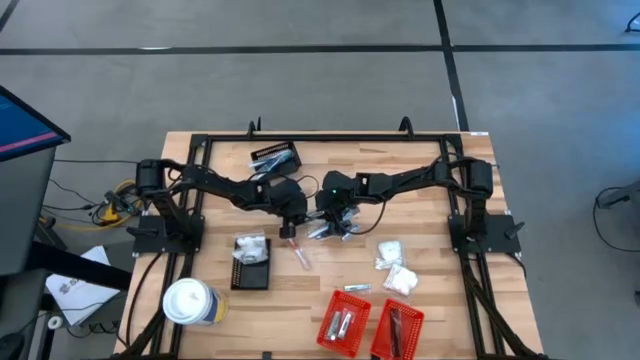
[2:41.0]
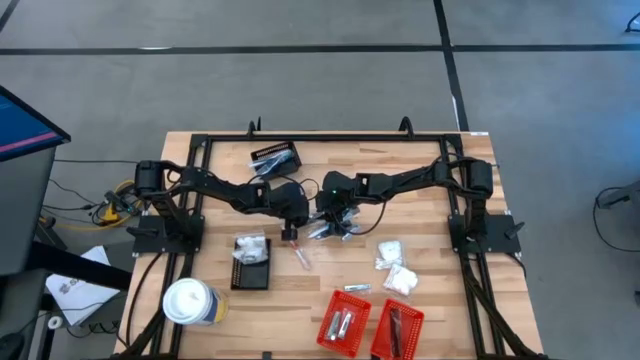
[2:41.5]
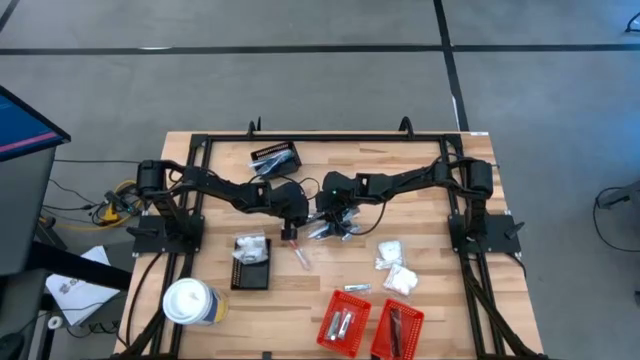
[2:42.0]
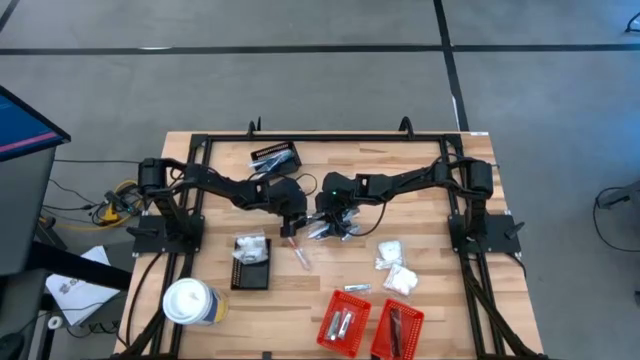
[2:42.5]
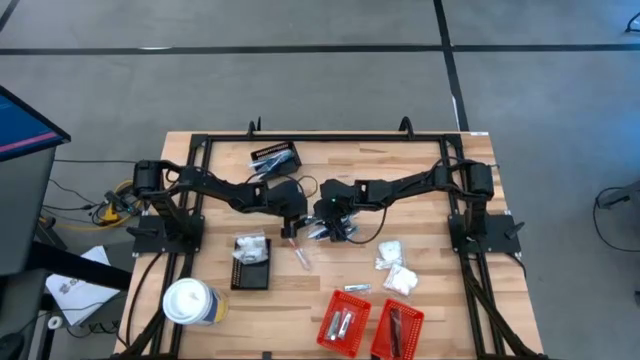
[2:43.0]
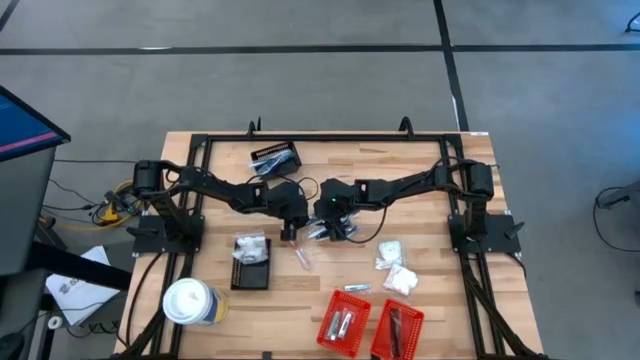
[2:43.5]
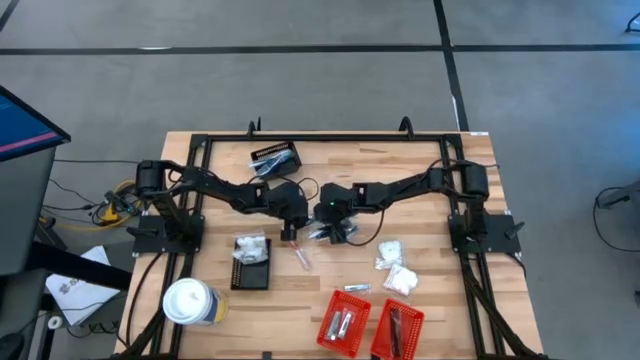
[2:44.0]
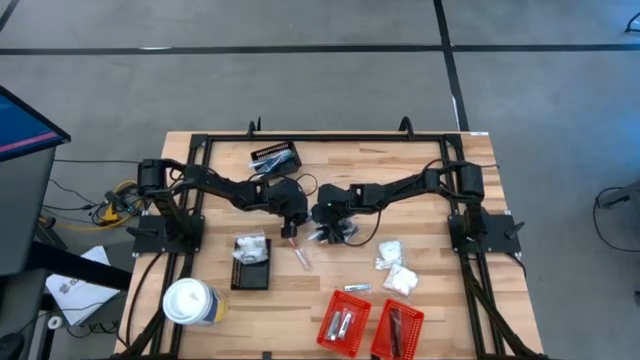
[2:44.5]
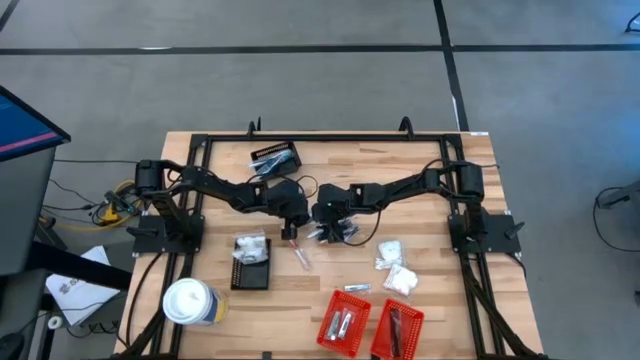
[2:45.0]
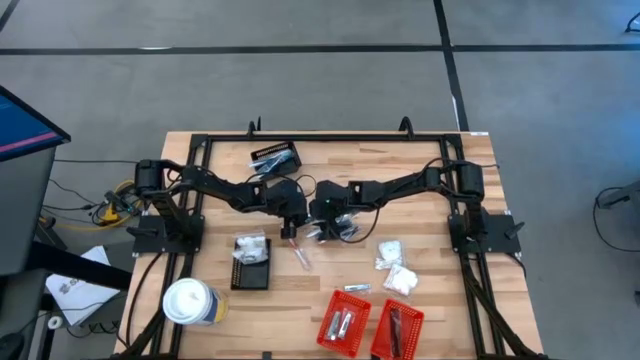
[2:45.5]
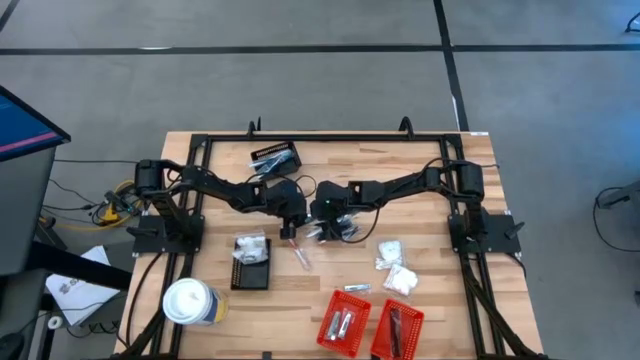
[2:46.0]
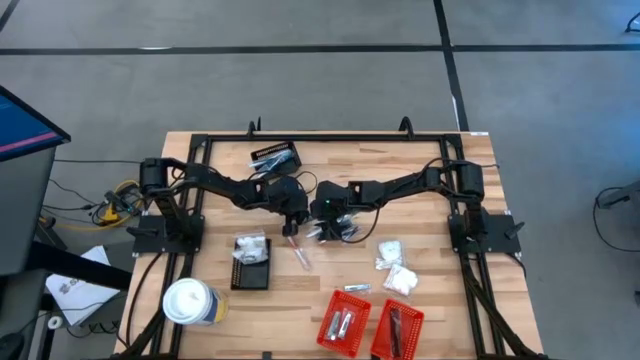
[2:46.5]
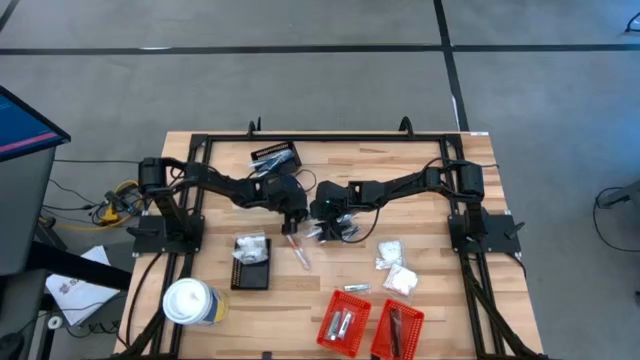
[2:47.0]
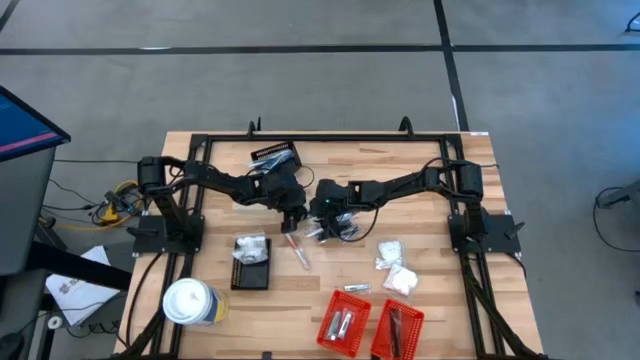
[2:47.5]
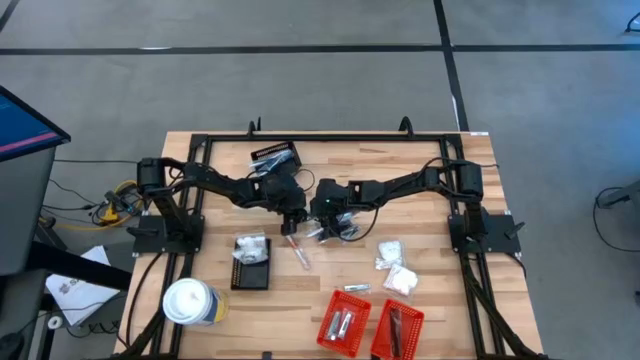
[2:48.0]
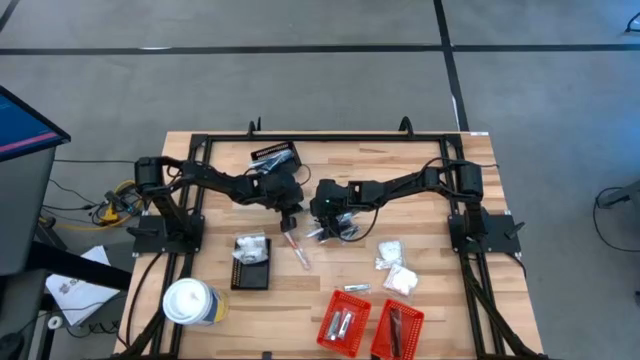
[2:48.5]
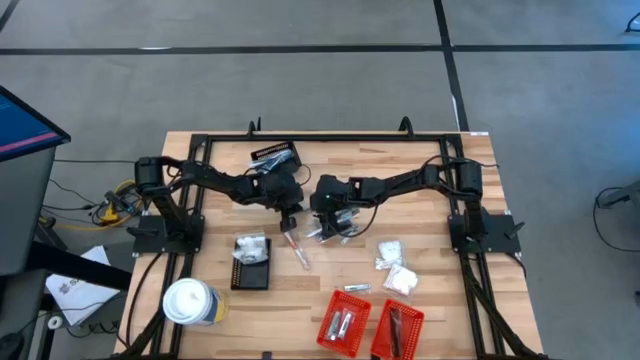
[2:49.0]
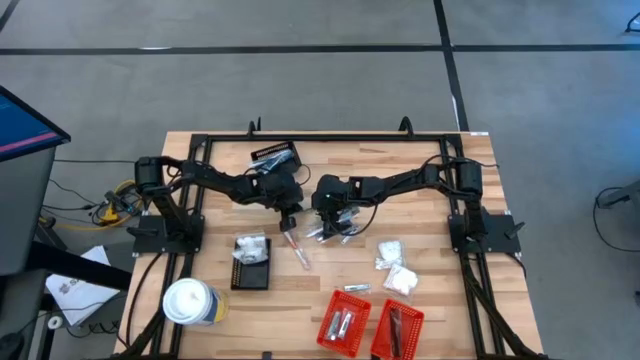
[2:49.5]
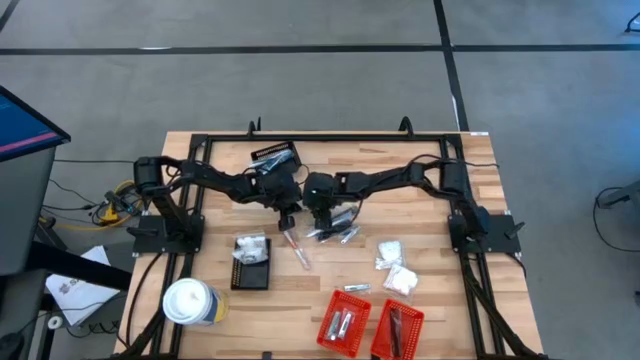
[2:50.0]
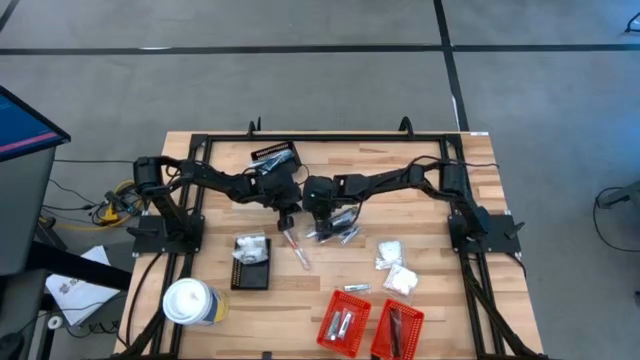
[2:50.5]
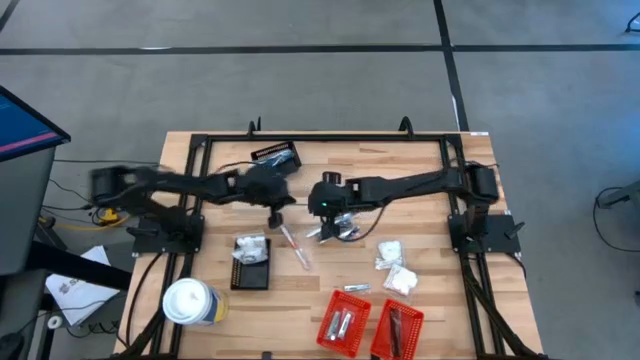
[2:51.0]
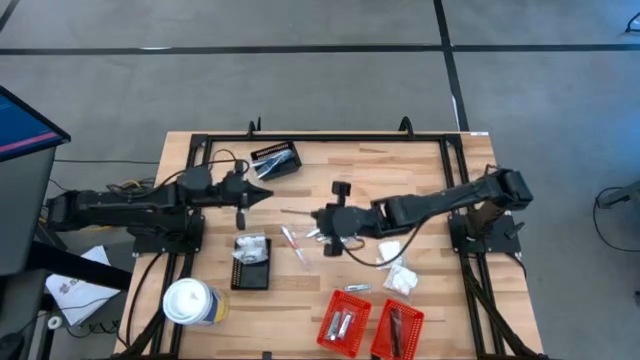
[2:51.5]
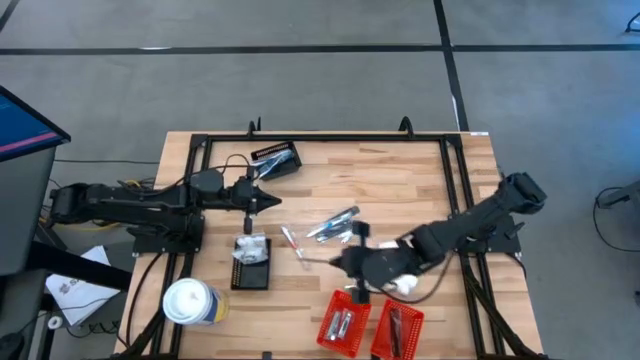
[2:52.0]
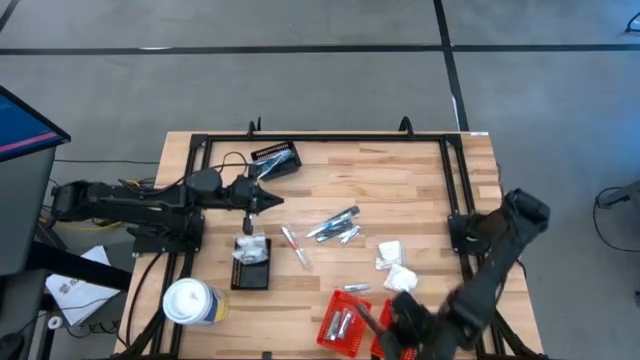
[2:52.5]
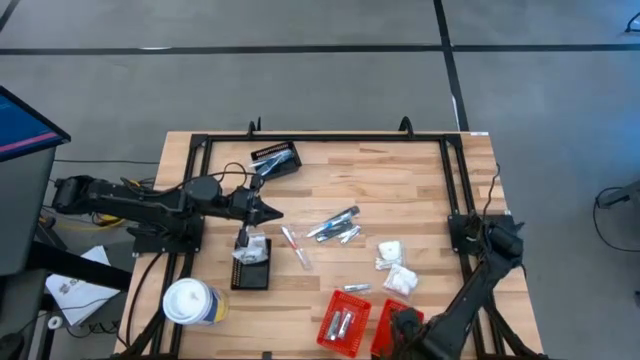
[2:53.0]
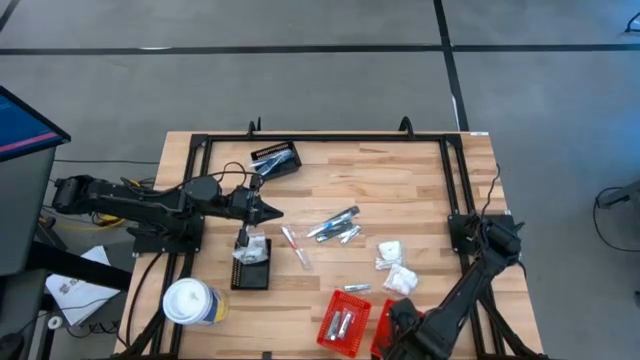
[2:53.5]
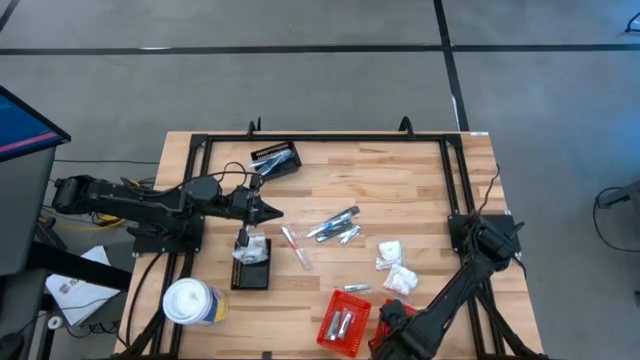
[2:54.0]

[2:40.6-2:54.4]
Task: Pick & Place Travel size toiletries
Put the black hair brush into the right red bin

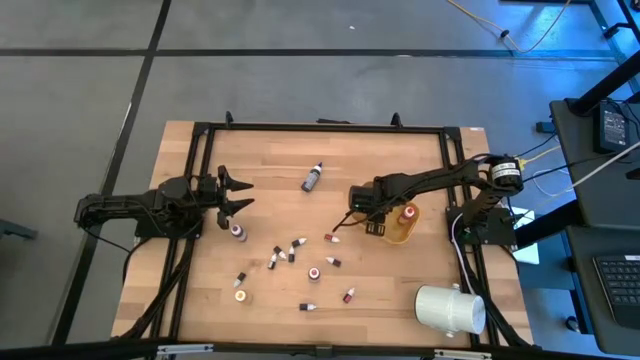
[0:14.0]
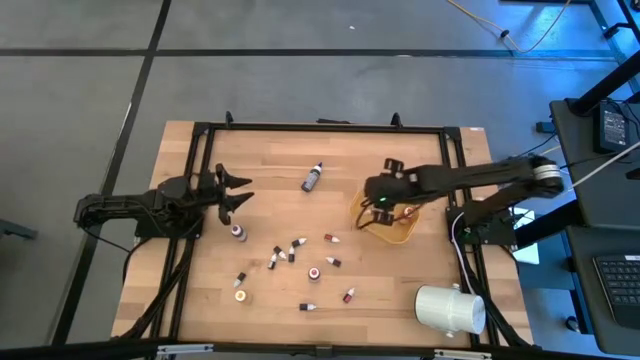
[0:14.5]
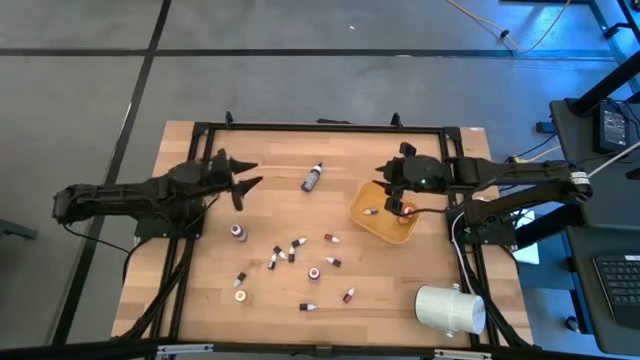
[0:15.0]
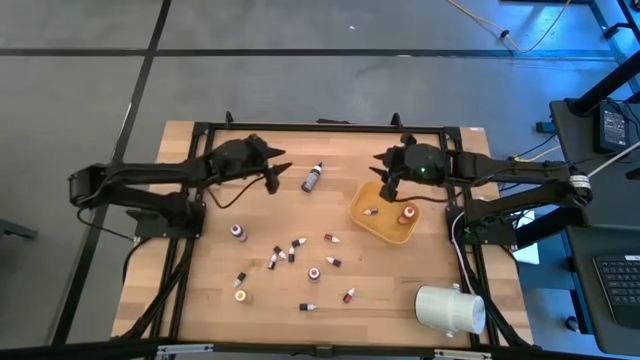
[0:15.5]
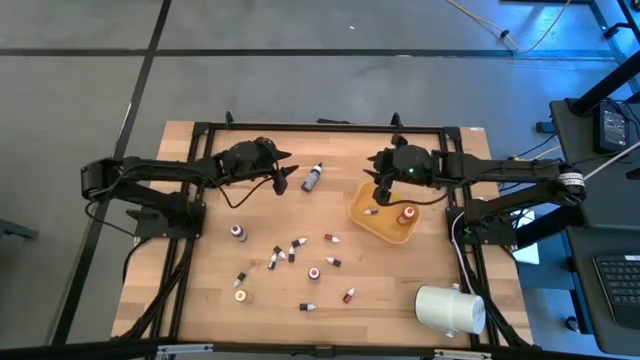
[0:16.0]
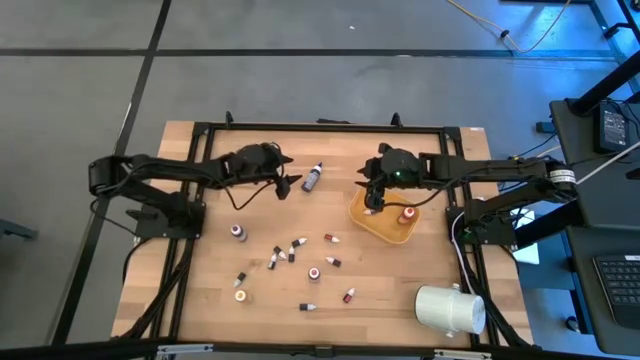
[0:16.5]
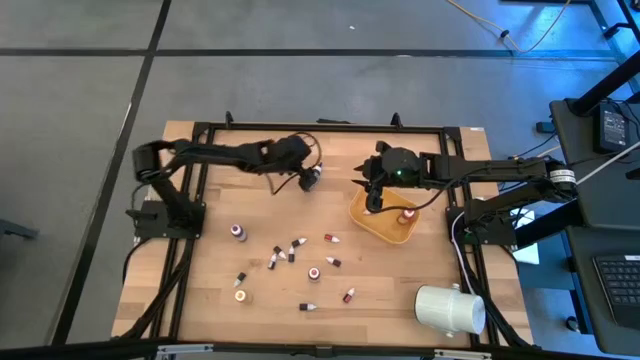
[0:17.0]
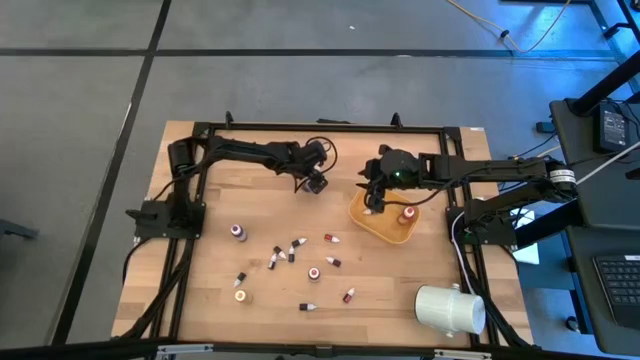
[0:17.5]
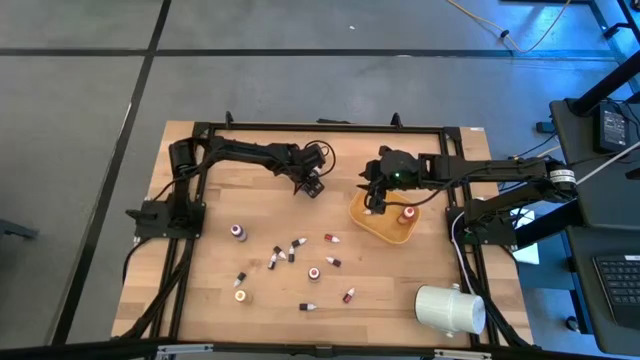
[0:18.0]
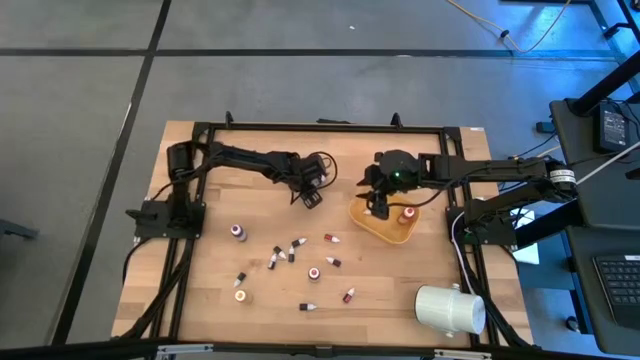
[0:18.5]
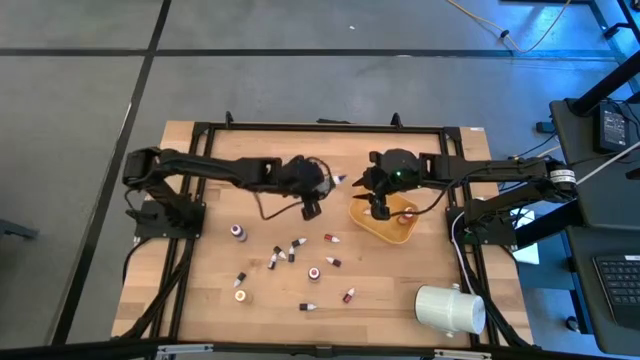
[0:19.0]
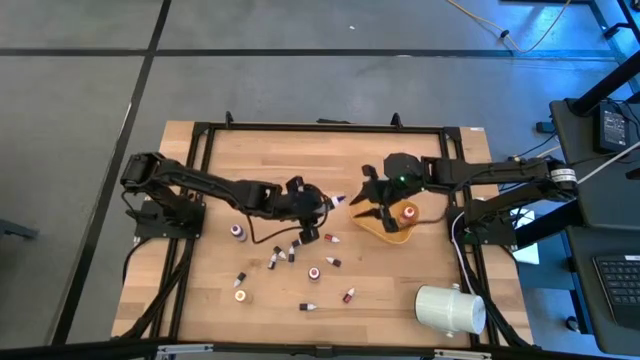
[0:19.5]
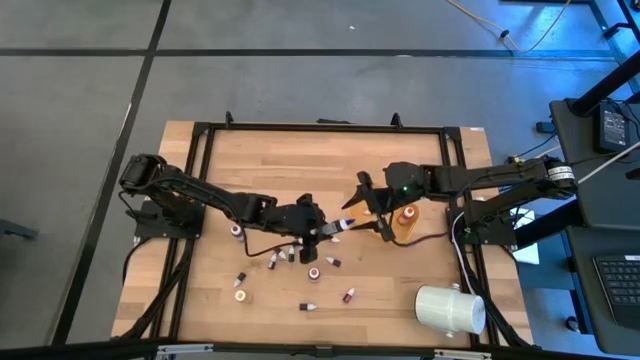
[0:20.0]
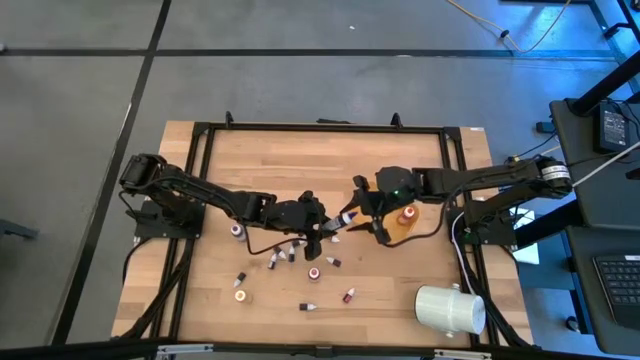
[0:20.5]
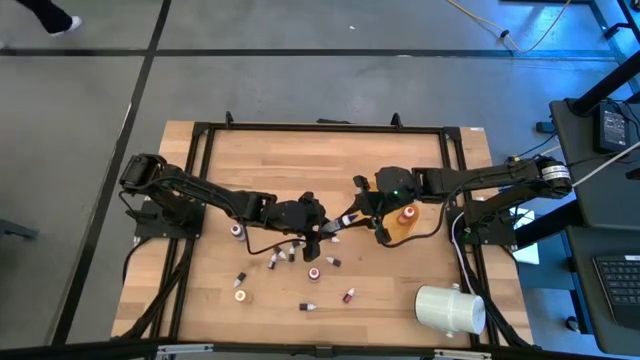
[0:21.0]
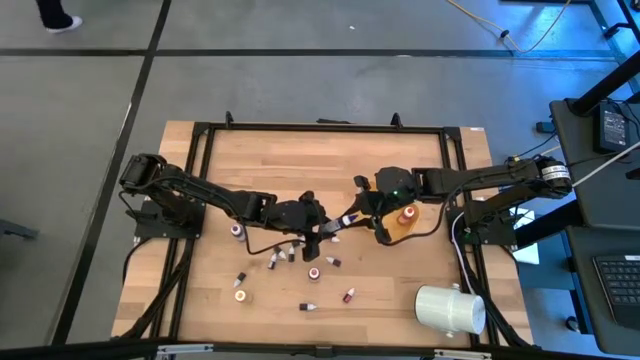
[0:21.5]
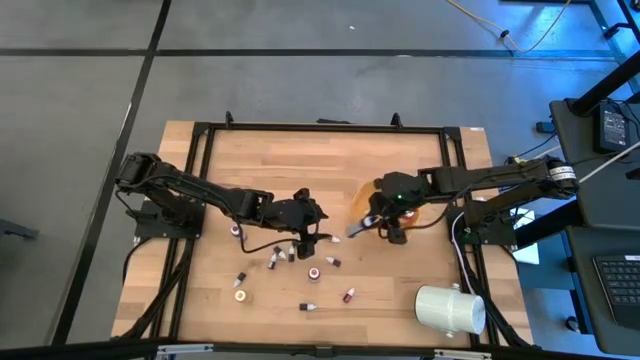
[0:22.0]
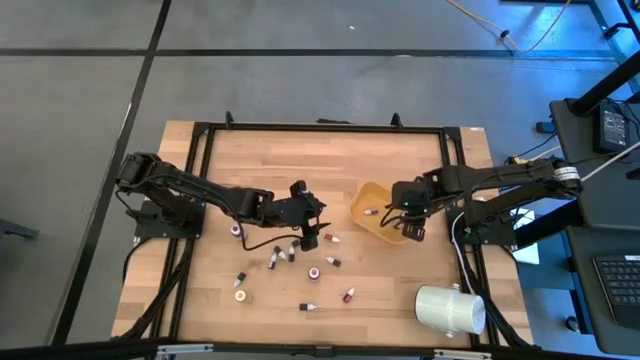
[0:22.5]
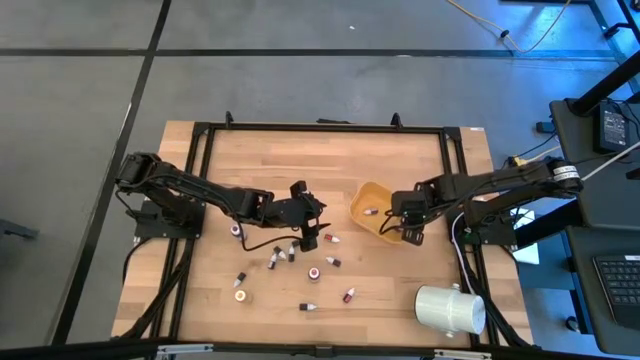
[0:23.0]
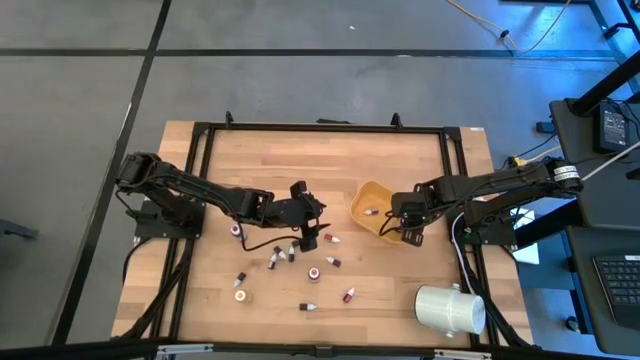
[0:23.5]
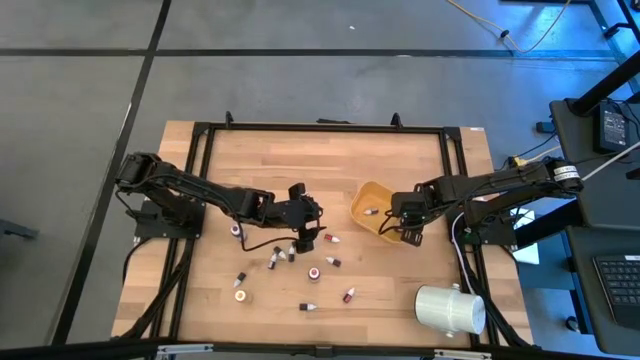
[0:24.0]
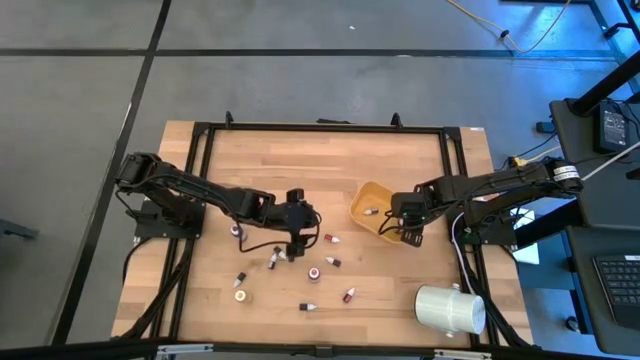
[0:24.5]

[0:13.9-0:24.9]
Task: Pick & Place food coloring
Put the large blue food coloring bottle in the yellow bin
